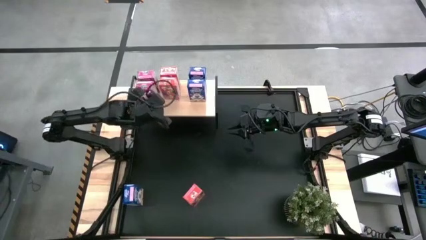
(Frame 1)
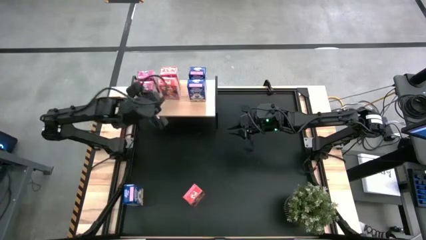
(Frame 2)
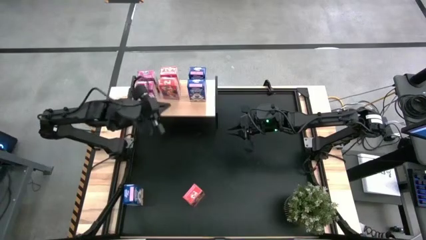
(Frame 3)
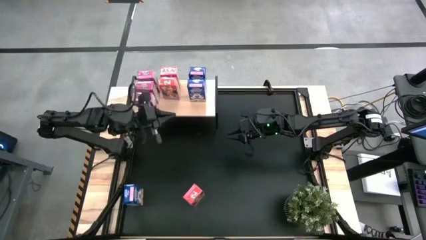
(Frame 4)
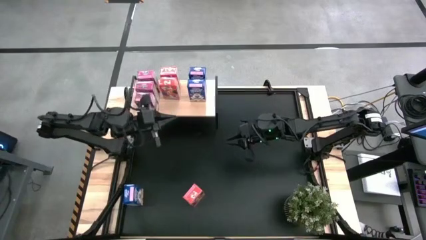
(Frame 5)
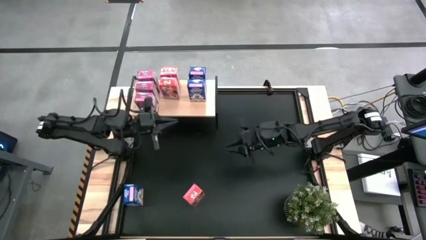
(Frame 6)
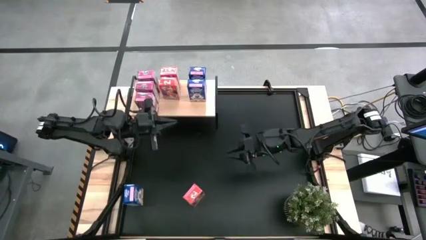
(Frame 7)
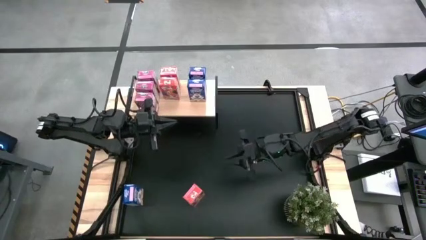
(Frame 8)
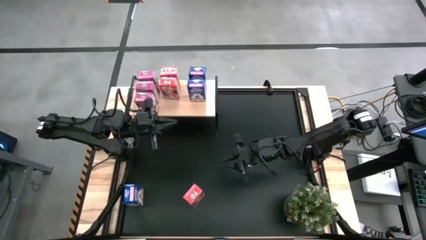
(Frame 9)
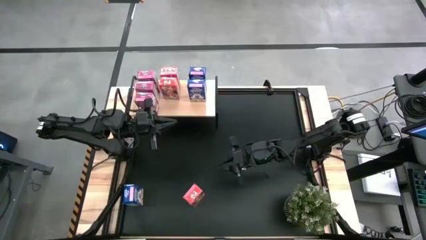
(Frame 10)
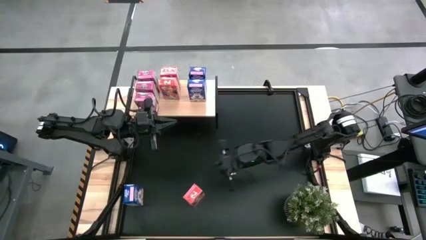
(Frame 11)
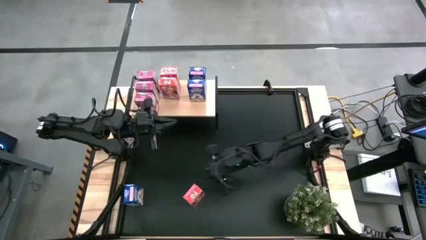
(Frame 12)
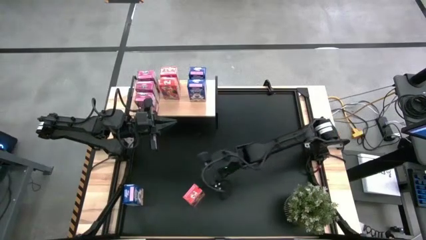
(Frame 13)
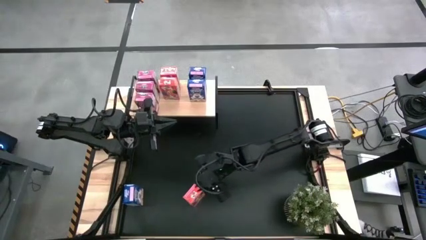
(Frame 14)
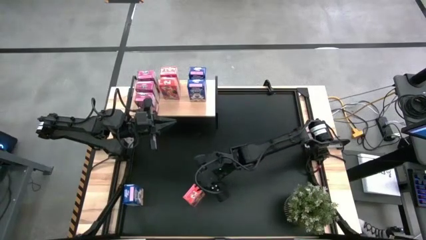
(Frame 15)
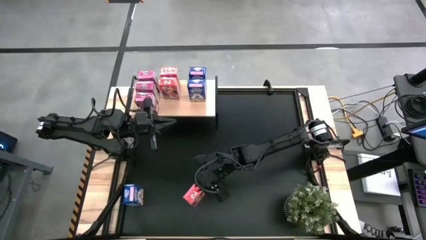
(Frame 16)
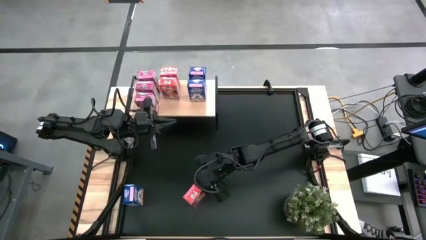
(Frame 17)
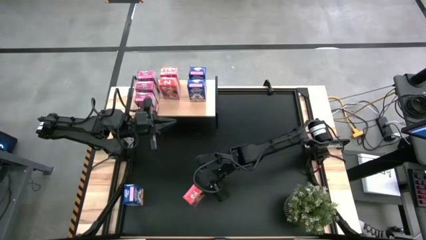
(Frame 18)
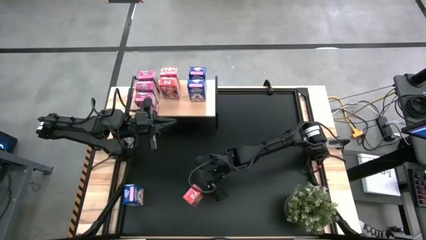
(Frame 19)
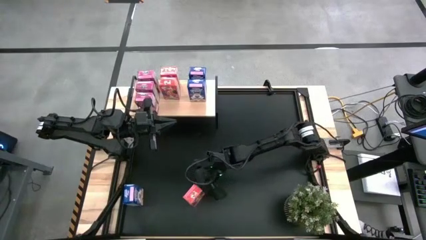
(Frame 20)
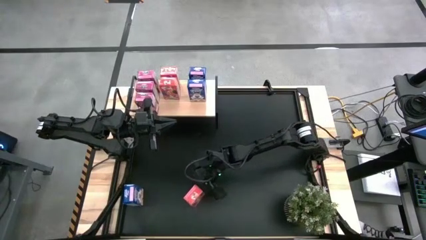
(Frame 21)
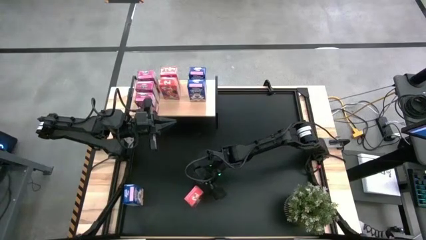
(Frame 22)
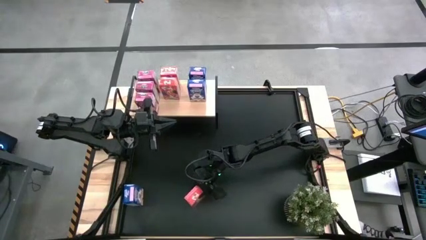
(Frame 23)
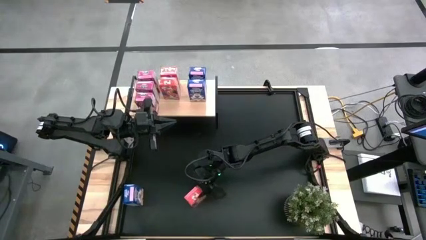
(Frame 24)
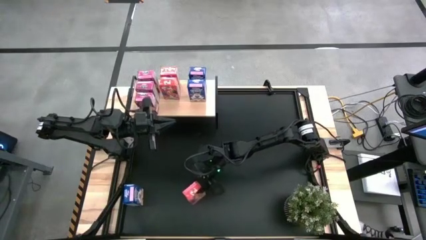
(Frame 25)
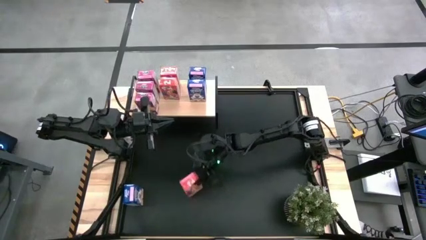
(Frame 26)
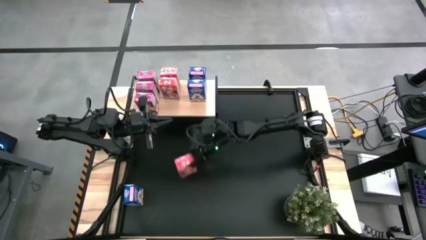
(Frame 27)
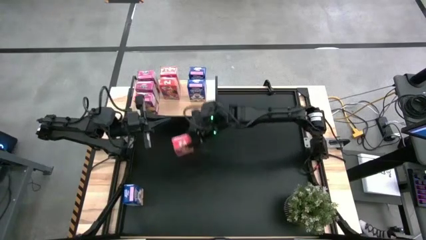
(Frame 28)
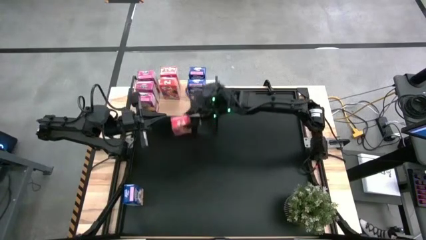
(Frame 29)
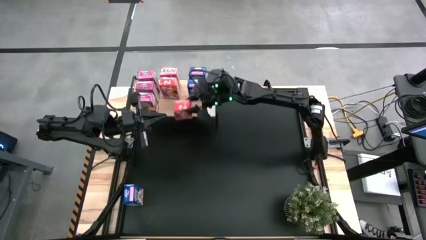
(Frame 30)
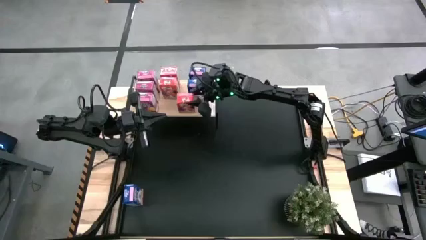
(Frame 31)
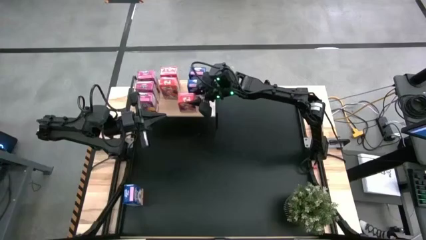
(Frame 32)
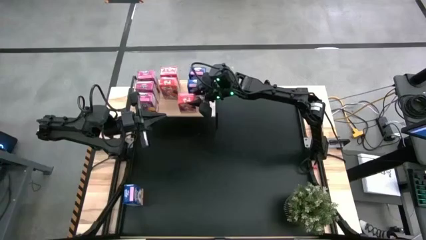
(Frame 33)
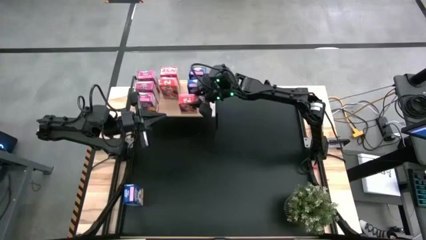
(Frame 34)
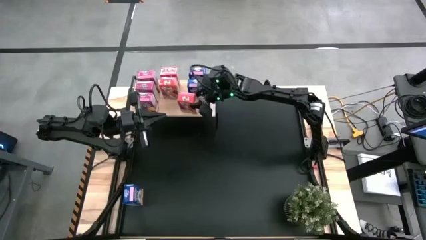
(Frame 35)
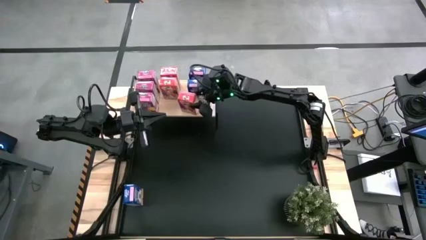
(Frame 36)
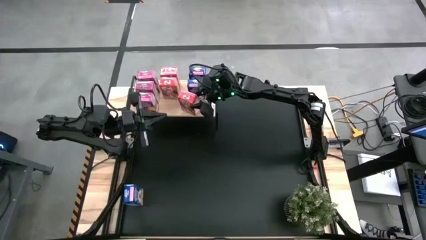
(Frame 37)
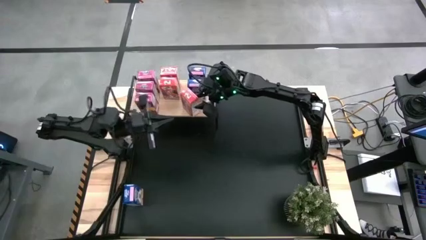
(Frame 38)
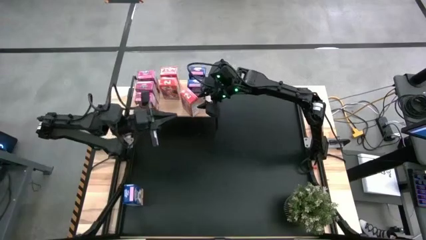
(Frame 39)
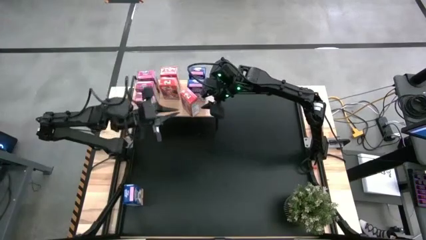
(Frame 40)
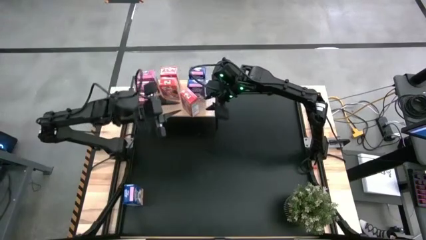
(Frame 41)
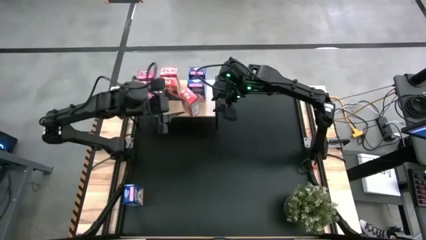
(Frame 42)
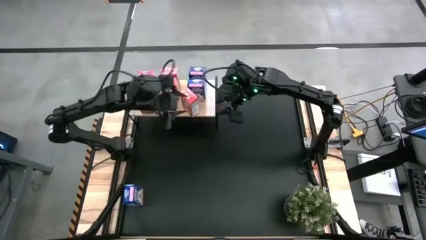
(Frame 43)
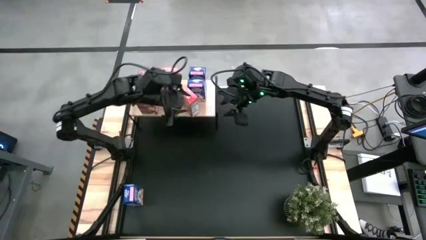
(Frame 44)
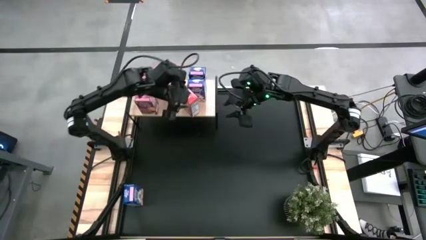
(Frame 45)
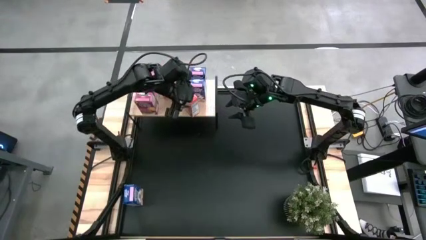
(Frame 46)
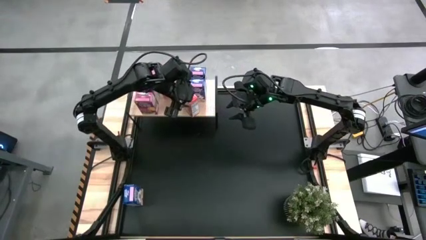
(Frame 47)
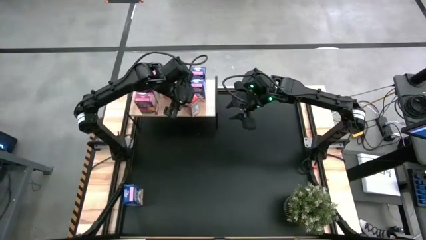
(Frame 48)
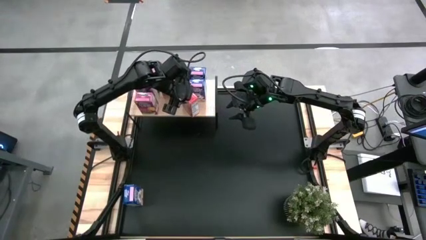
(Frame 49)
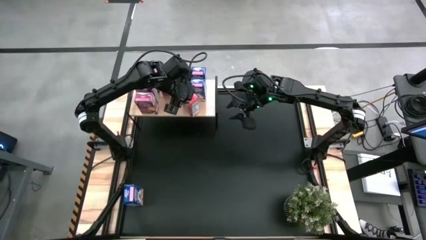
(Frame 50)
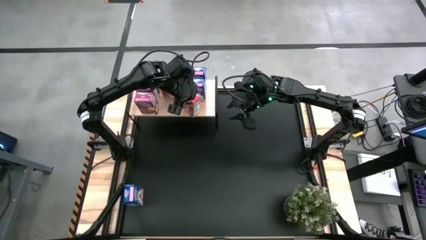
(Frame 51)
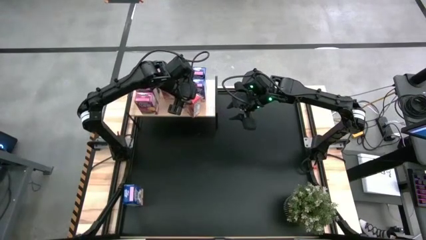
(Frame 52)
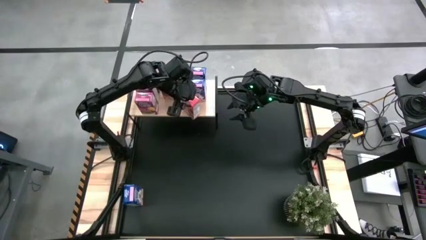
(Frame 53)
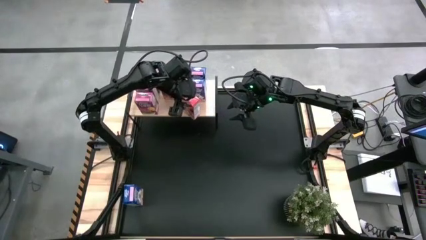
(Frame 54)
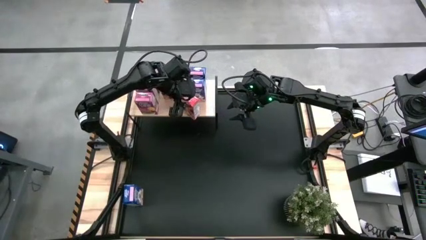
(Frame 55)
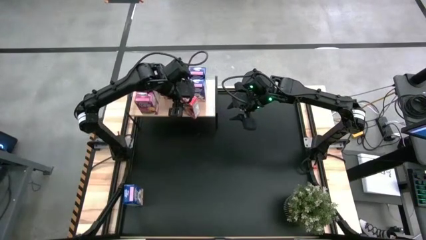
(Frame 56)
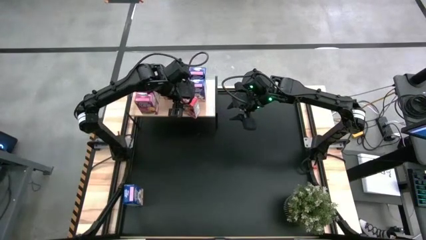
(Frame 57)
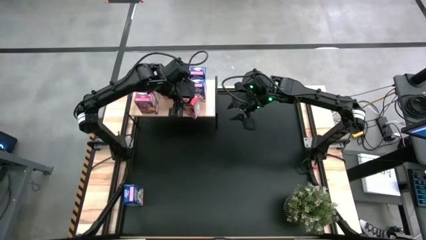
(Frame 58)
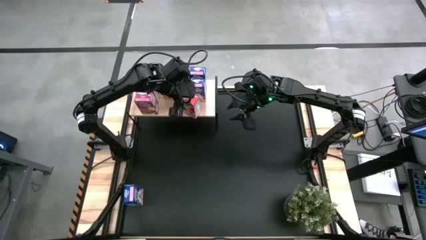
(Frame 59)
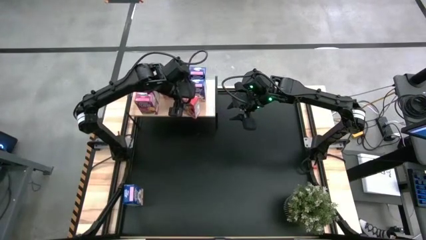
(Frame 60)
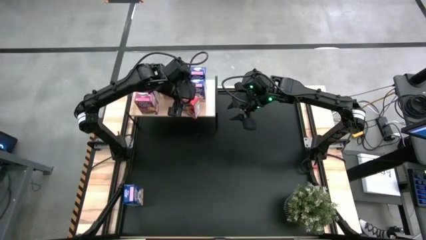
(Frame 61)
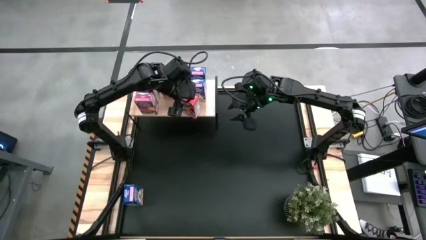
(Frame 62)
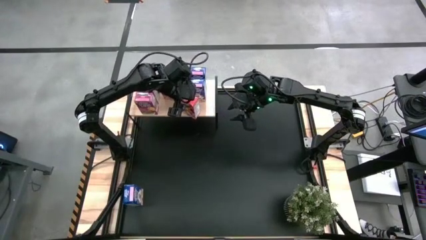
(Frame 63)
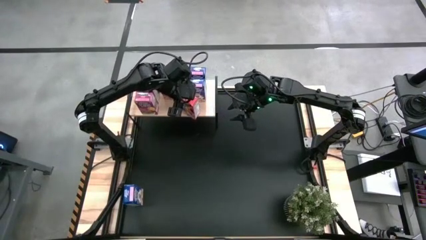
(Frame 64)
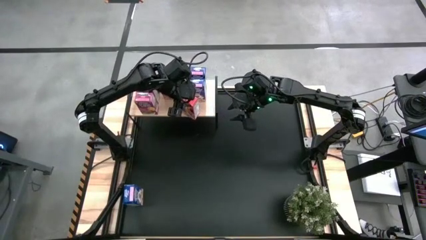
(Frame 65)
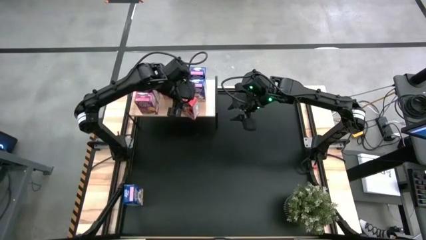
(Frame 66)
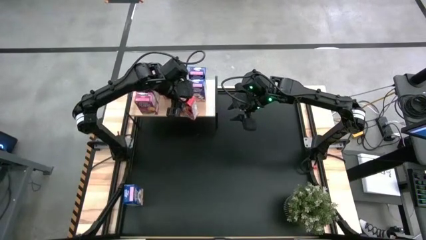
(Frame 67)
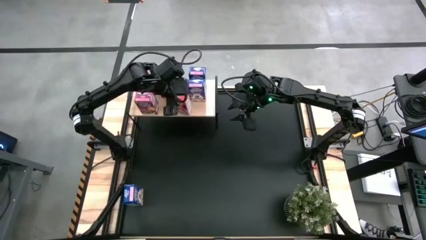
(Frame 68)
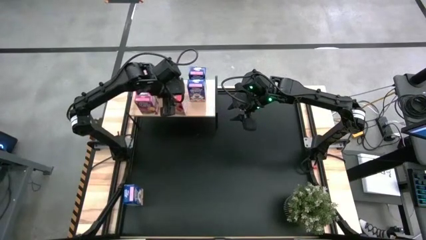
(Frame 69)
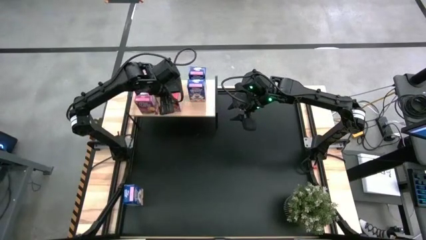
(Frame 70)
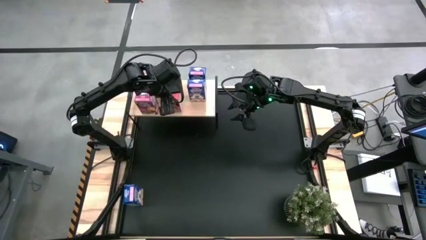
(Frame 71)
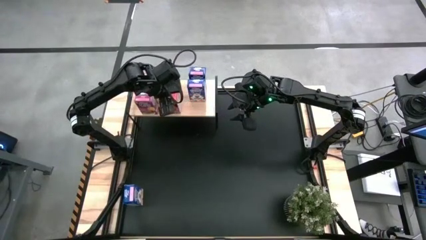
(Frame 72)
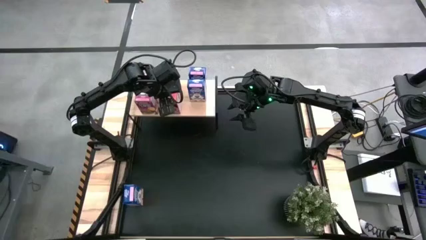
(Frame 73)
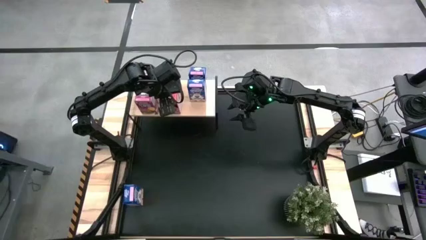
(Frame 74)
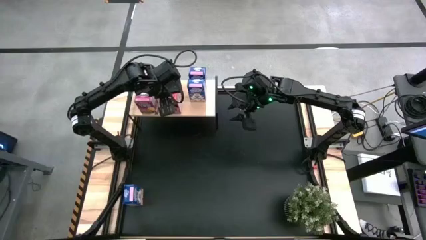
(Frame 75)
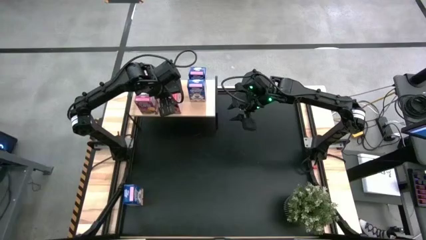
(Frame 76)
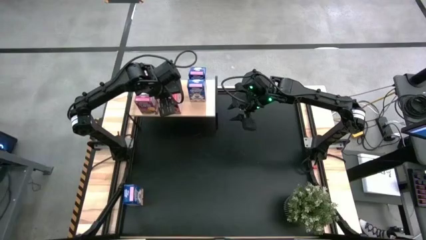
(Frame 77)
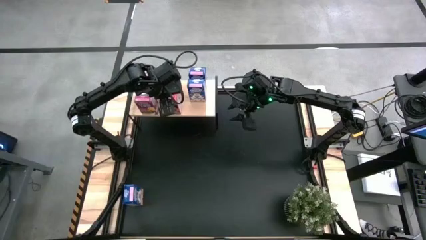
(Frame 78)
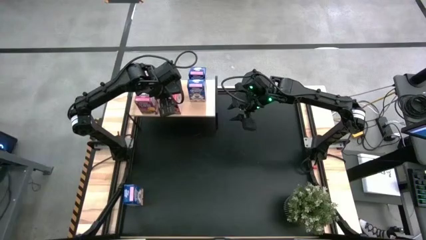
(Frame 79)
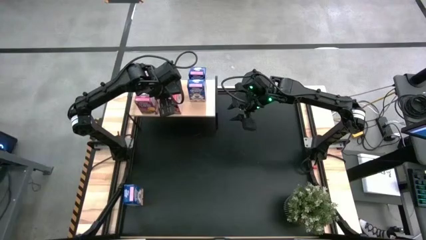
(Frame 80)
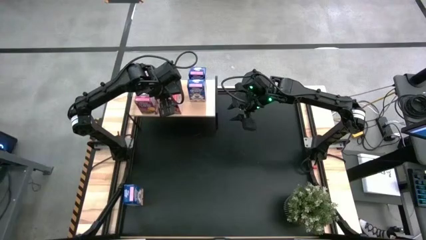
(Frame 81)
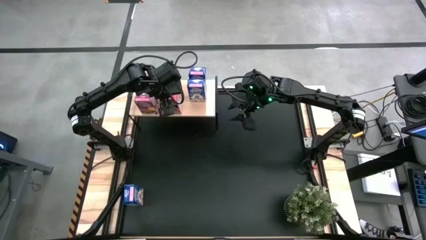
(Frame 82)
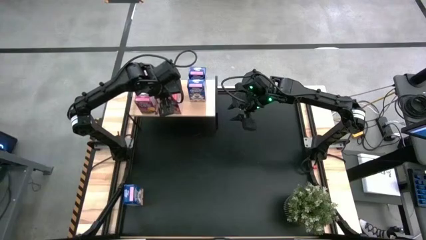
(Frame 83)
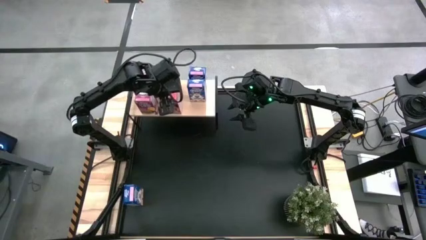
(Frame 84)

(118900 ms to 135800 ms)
Task: Stack cereal on shelf
Align the red cereal box with the other red cereal box on the shelf
